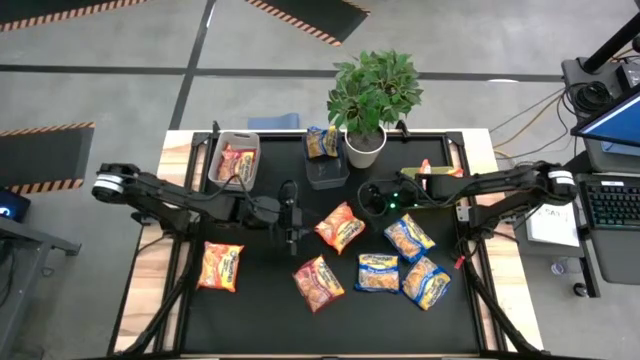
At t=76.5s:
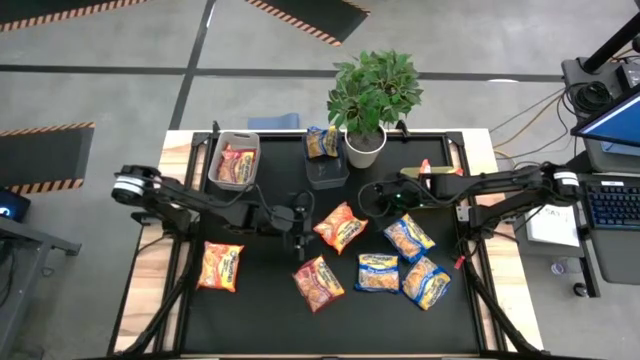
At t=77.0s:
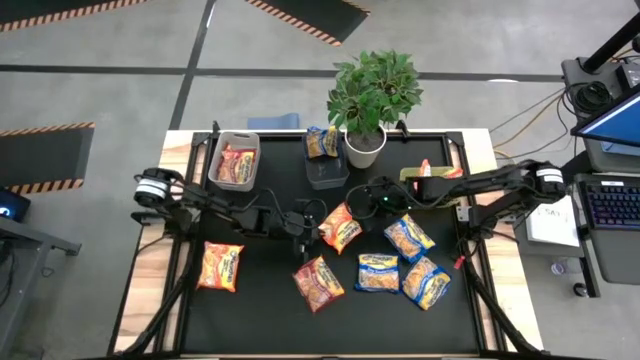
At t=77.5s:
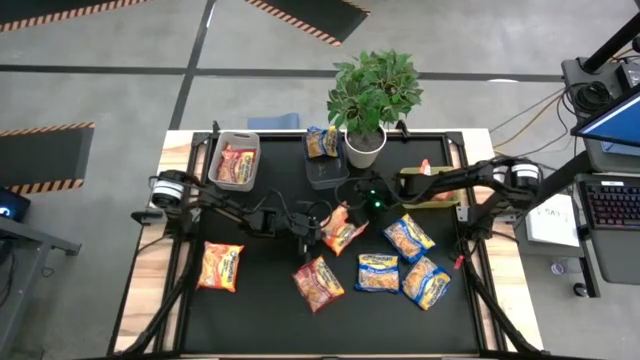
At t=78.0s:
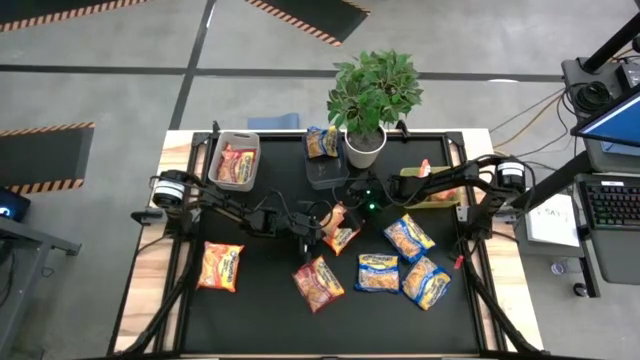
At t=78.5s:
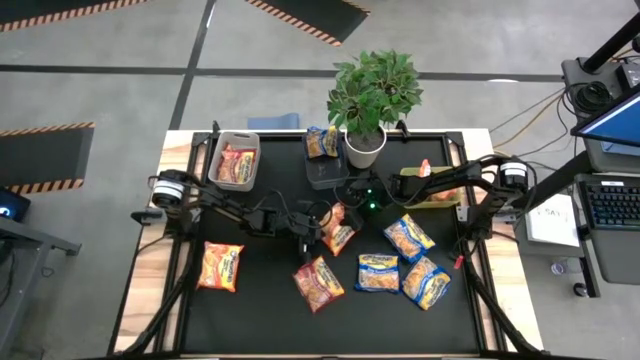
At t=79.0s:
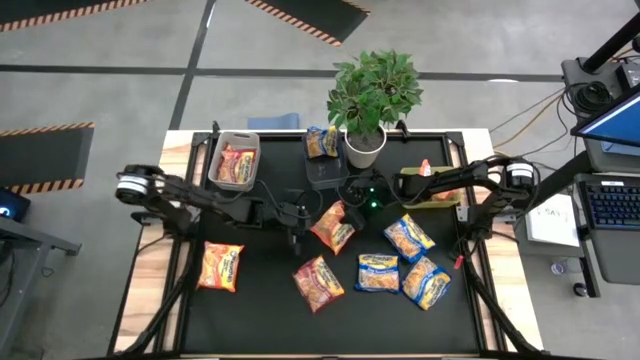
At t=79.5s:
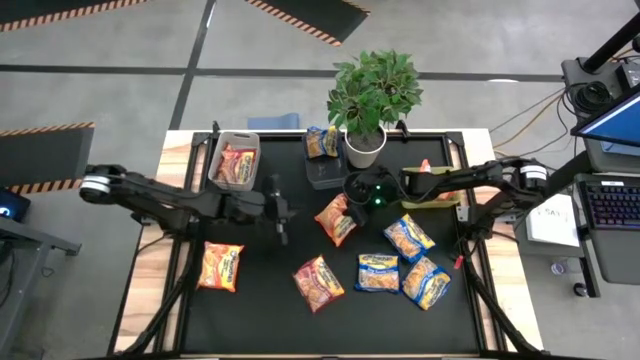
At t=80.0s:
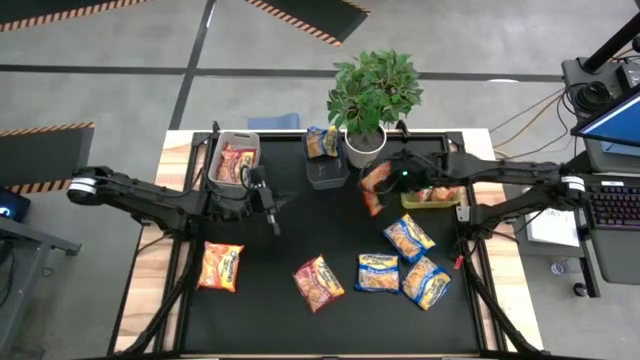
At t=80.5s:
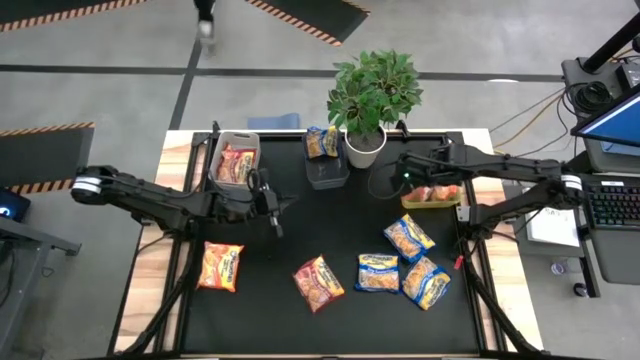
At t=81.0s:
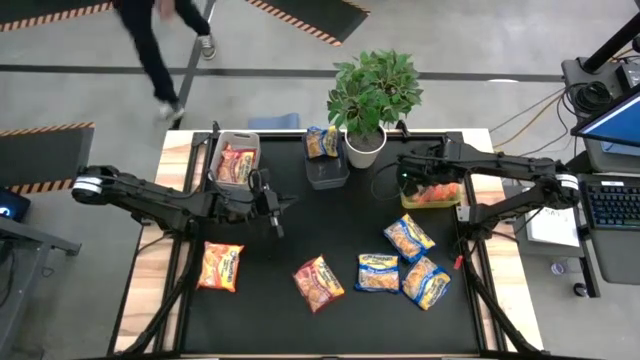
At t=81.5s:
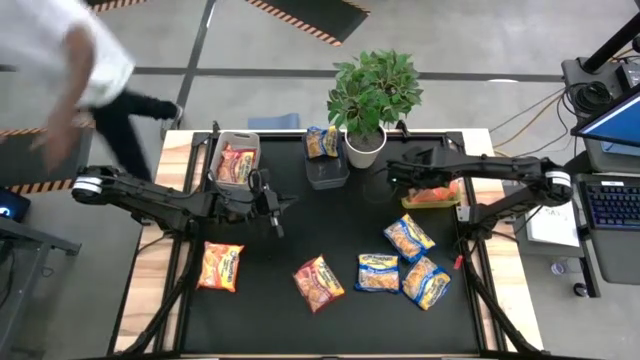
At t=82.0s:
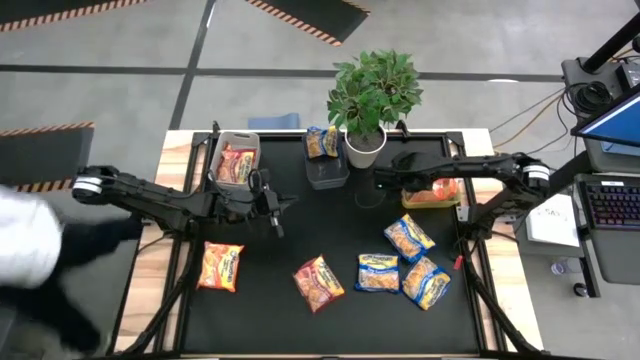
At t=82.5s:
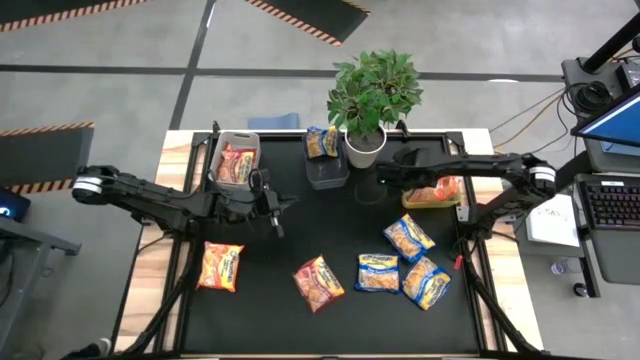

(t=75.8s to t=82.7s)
Task: Sort Maruchan noodles
Put the orange noodle pack into the yellow bin

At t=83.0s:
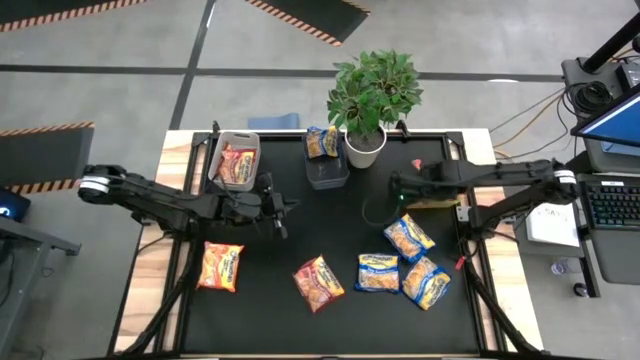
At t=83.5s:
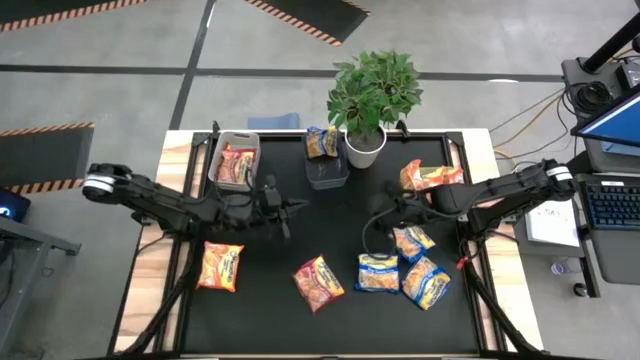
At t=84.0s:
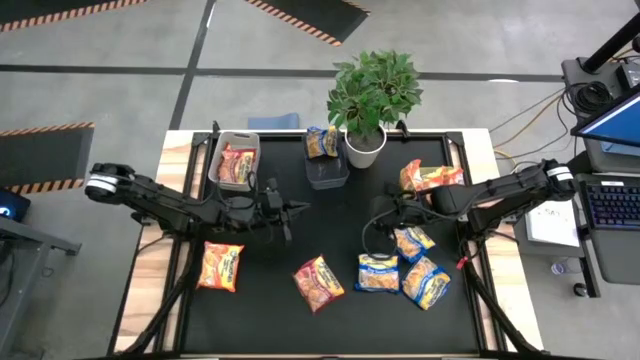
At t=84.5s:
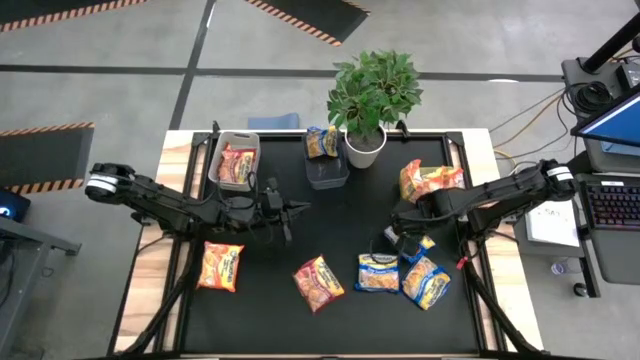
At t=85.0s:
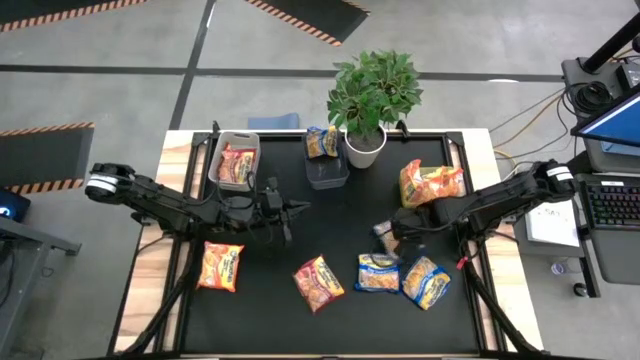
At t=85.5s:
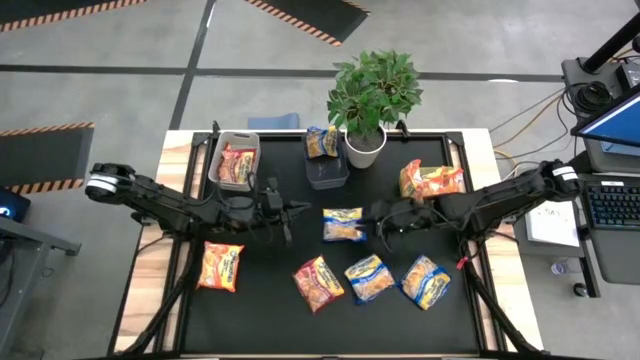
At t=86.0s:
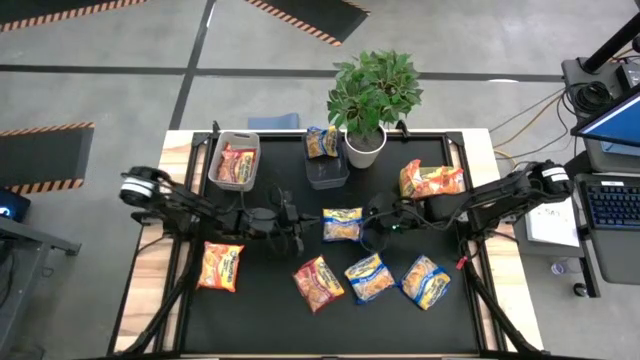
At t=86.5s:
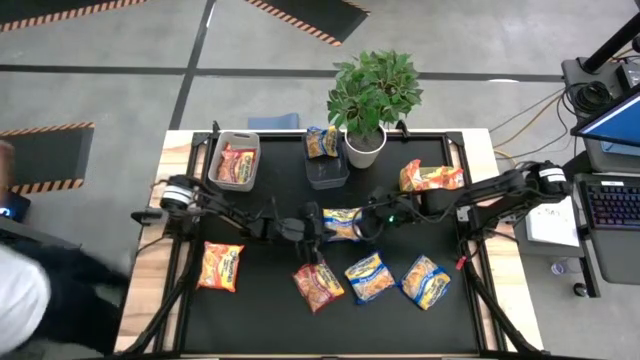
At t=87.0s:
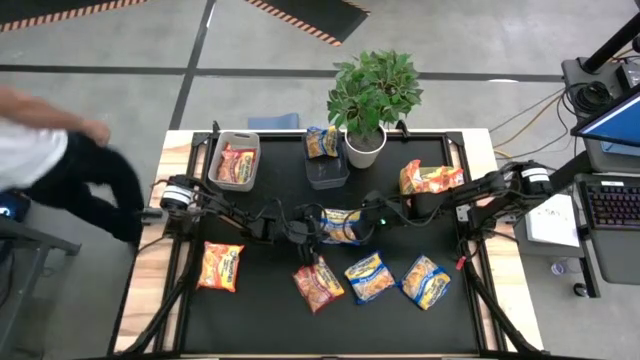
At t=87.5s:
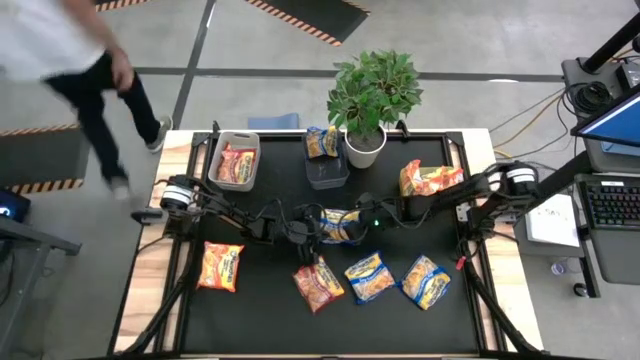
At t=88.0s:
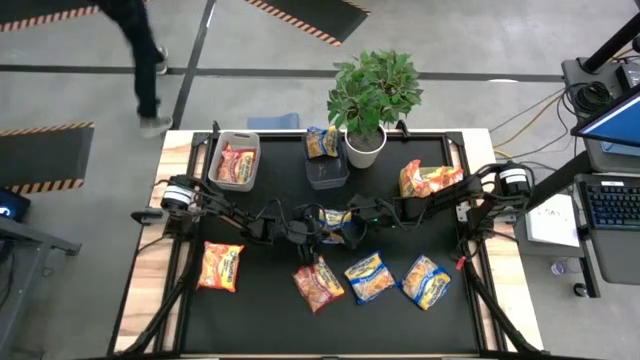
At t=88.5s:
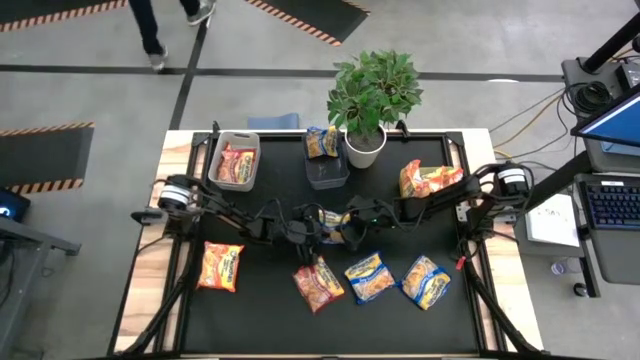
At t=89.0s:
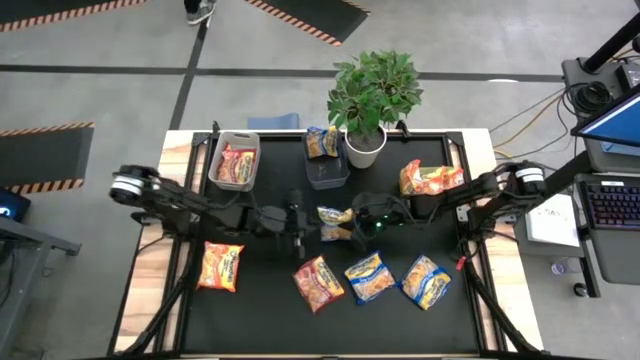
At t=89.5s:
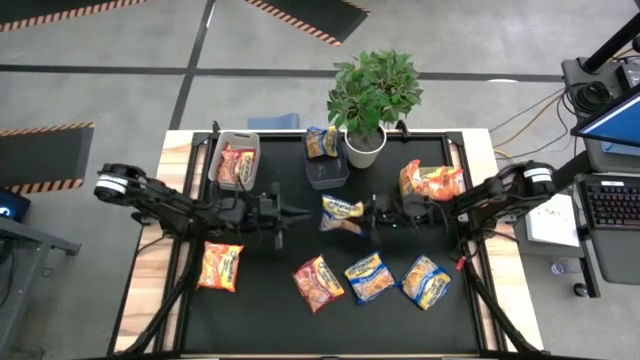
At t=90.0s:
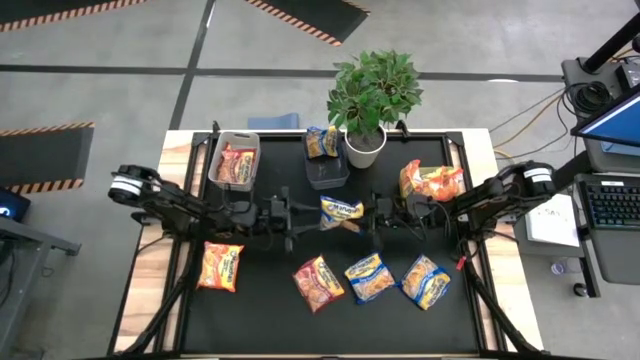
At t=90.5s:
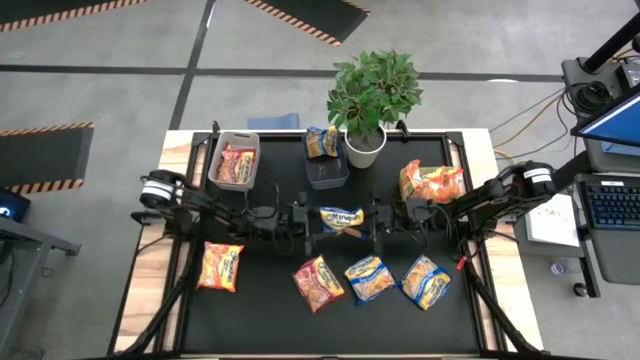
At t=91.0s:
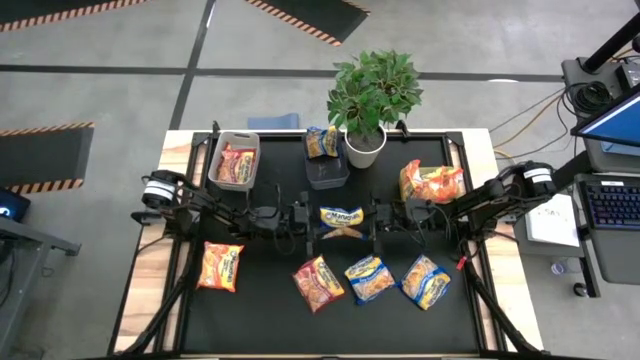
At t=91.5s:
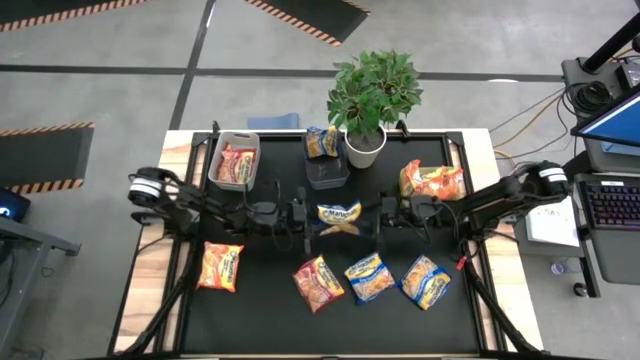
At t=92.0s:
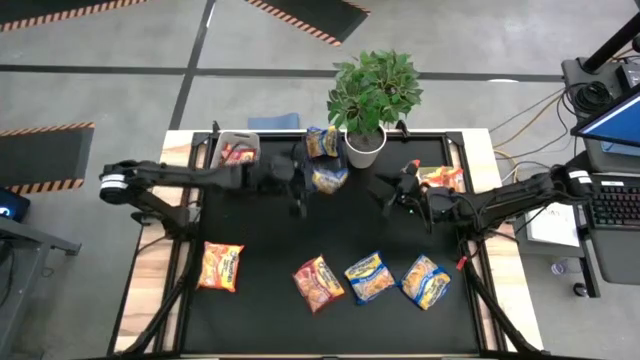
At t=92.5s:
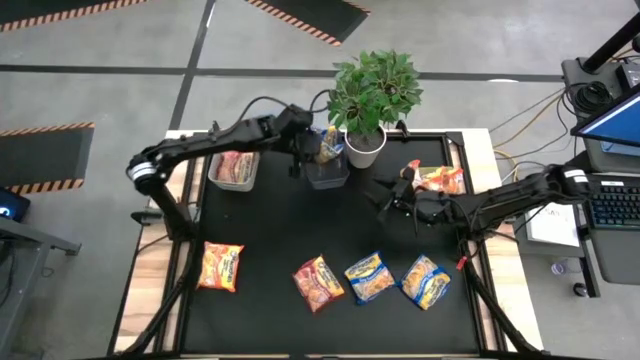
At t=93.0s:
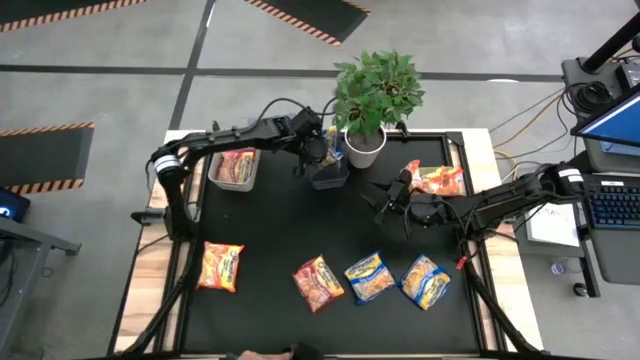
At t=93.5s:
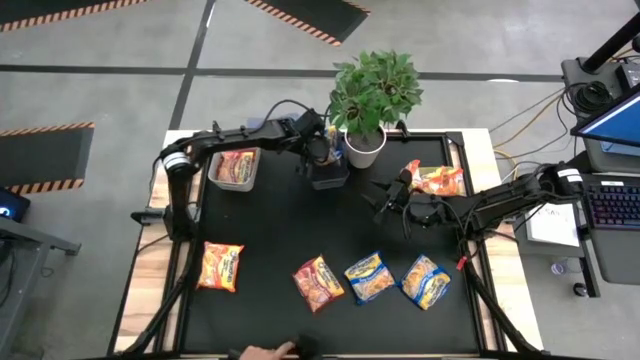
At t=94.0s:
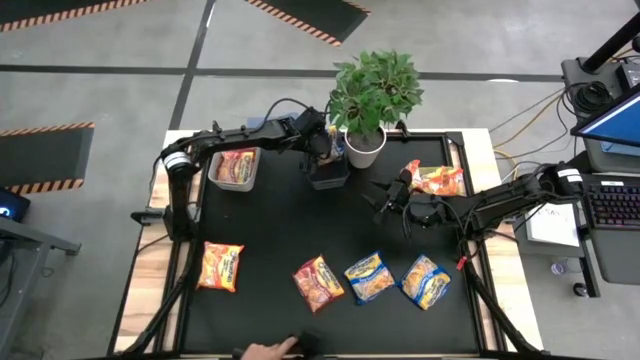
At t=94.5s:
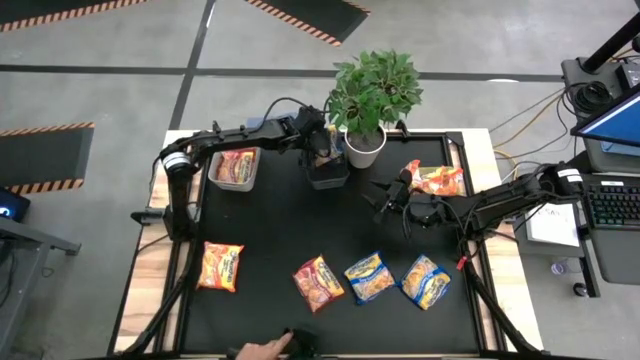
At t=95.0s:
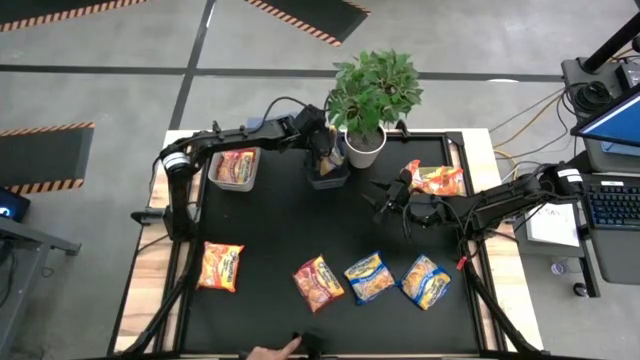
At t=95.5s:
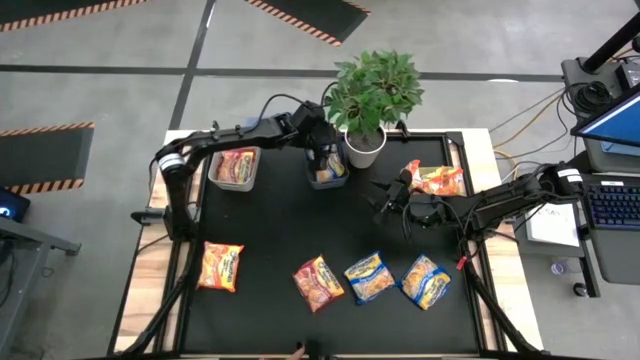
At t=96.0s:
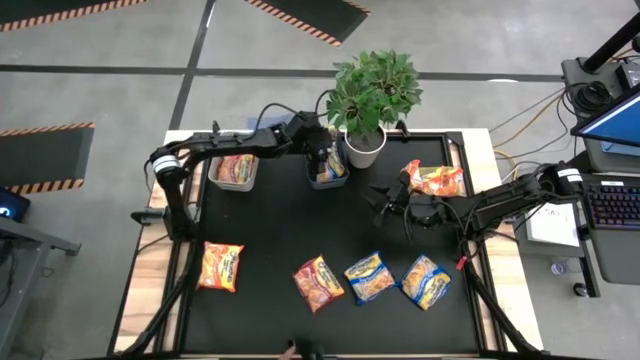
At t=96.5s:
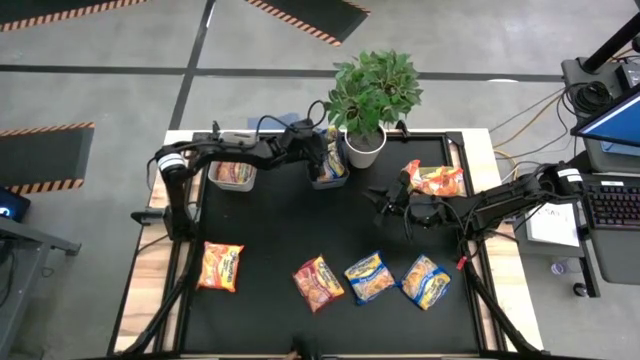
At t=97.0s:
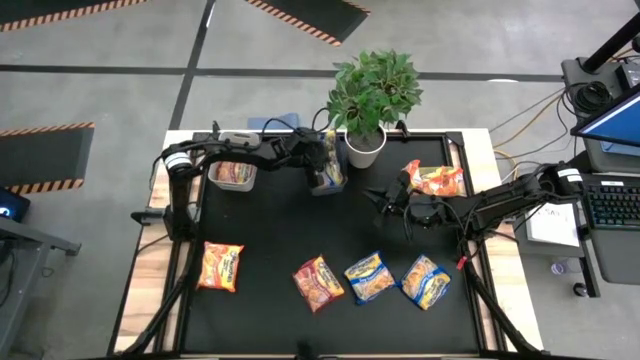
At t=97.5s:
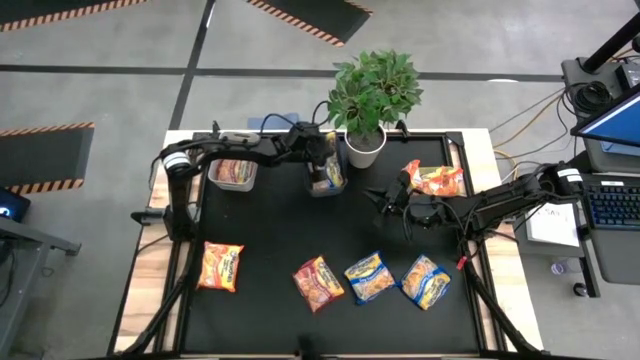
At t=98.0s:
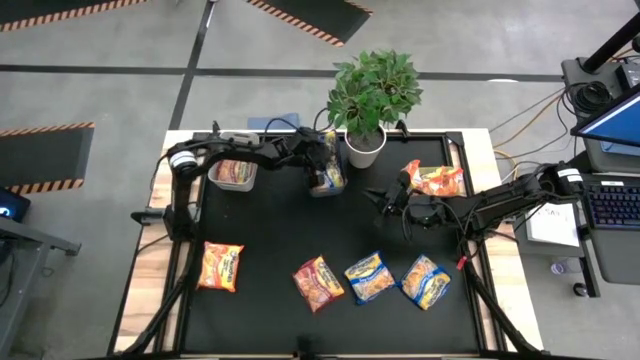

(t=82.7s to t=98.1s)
Put the blue noodle pack into the black bin
